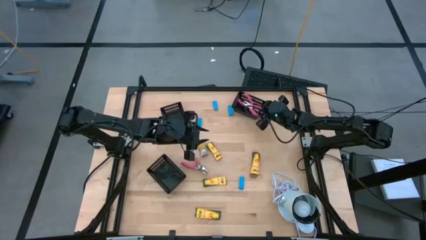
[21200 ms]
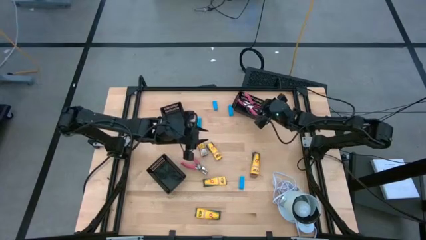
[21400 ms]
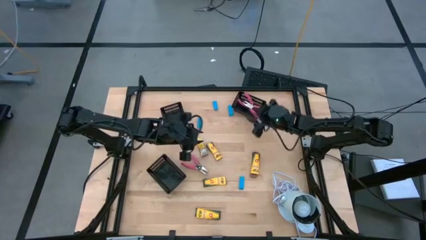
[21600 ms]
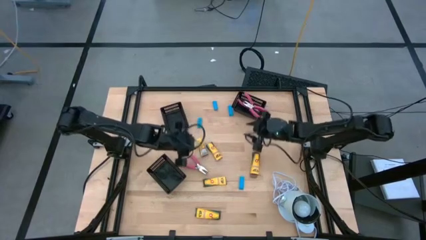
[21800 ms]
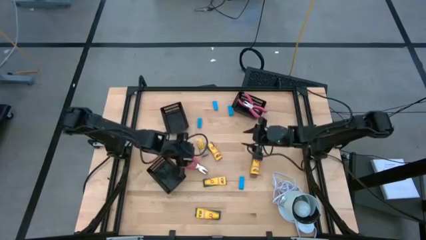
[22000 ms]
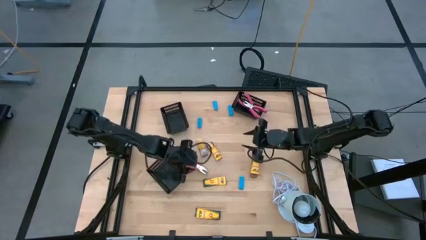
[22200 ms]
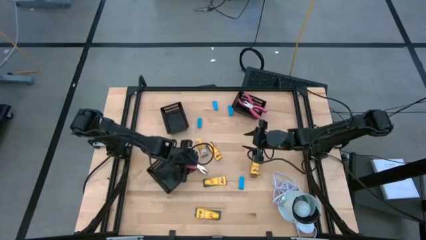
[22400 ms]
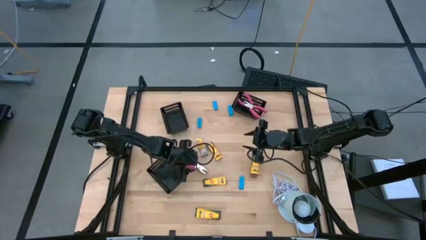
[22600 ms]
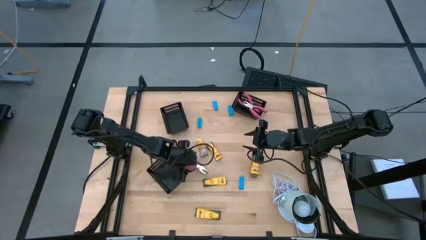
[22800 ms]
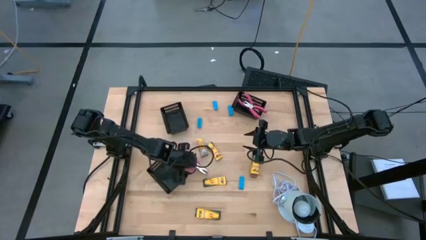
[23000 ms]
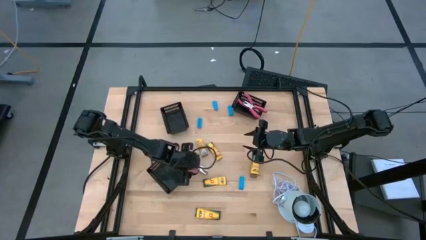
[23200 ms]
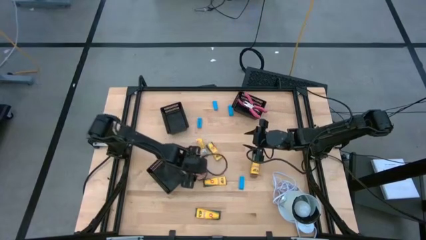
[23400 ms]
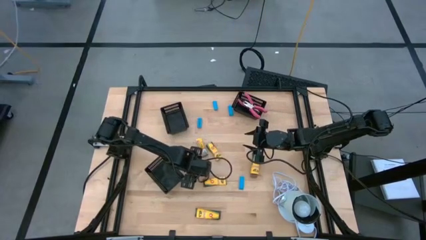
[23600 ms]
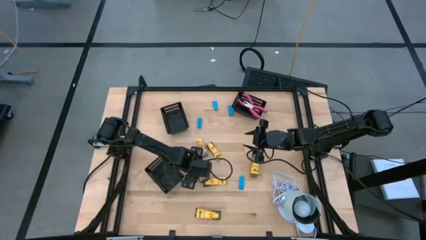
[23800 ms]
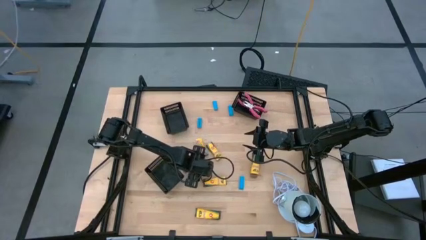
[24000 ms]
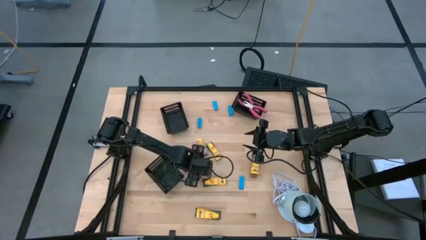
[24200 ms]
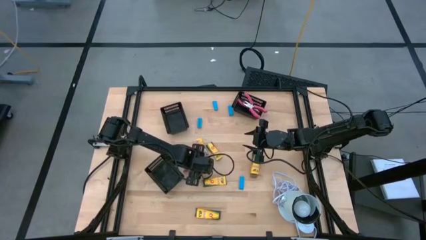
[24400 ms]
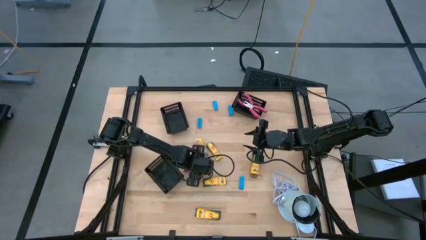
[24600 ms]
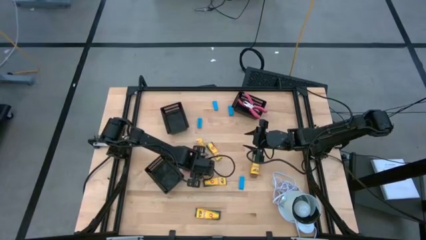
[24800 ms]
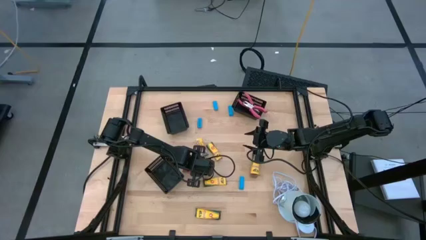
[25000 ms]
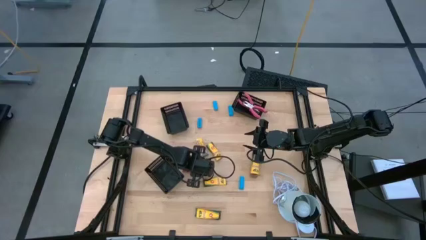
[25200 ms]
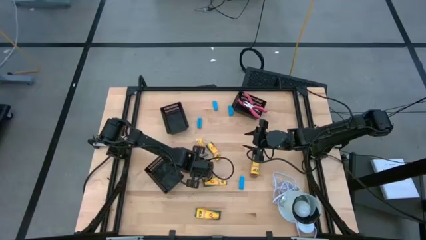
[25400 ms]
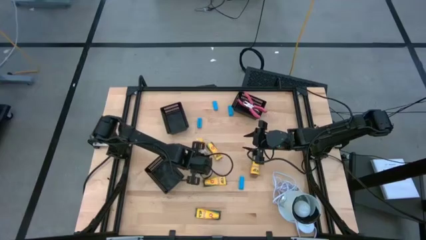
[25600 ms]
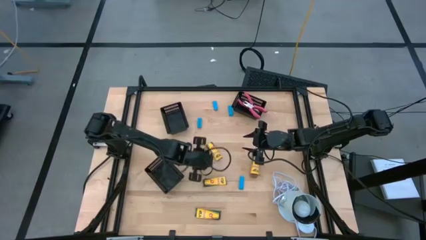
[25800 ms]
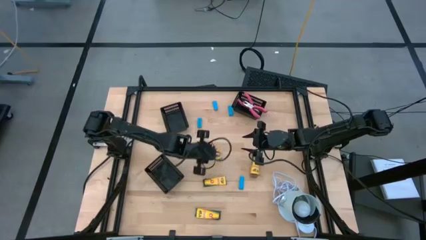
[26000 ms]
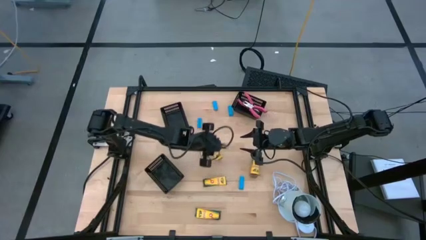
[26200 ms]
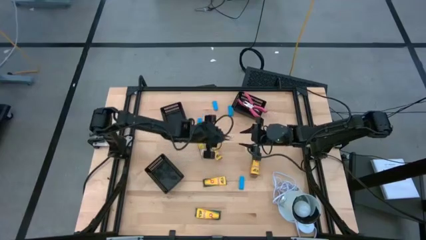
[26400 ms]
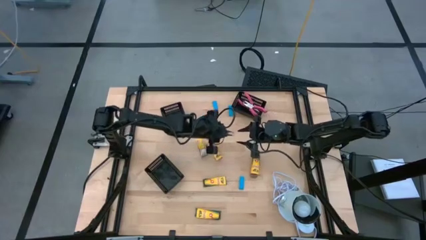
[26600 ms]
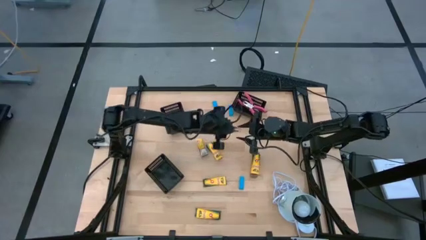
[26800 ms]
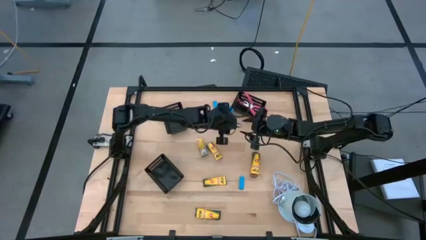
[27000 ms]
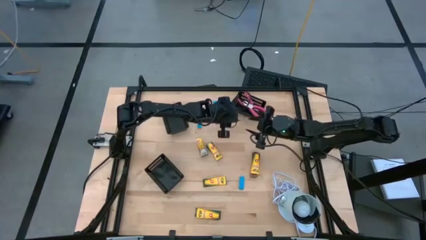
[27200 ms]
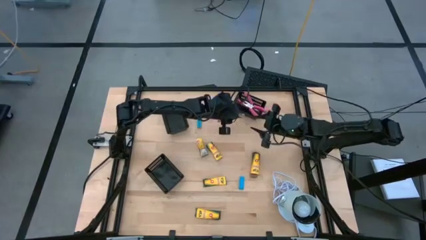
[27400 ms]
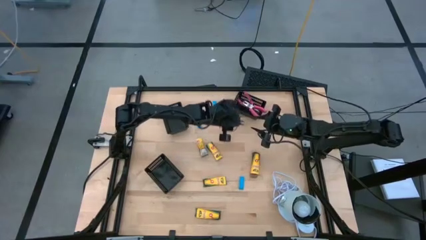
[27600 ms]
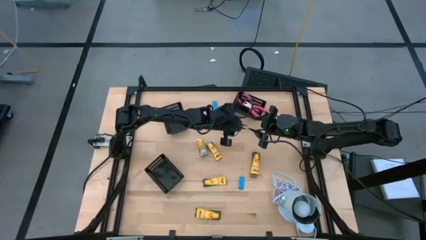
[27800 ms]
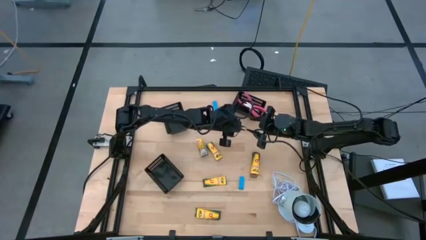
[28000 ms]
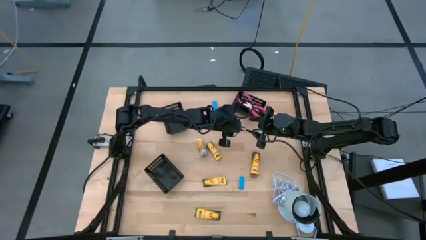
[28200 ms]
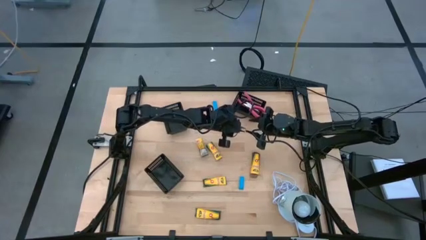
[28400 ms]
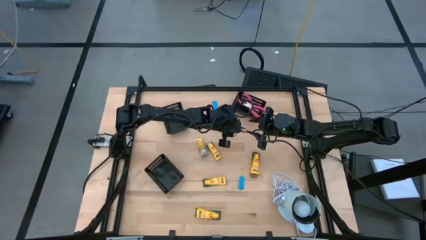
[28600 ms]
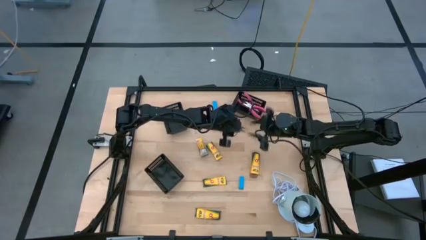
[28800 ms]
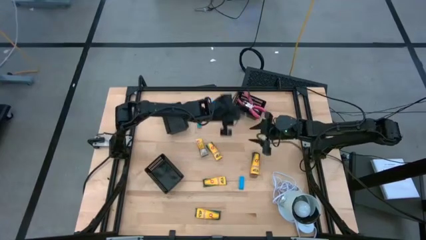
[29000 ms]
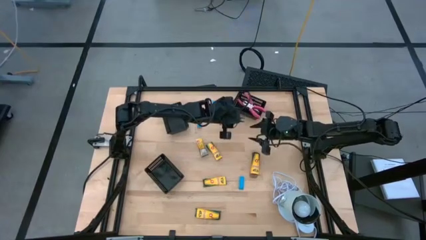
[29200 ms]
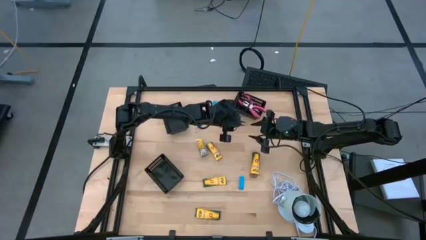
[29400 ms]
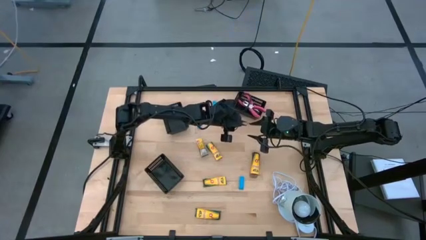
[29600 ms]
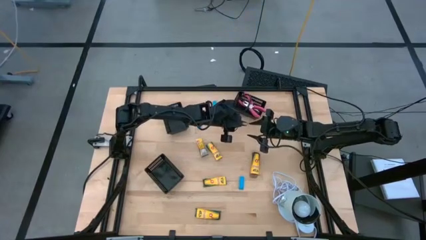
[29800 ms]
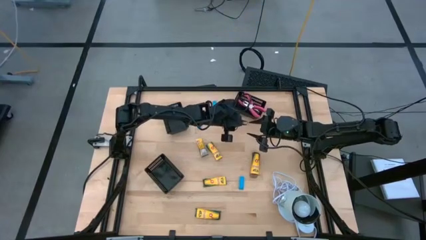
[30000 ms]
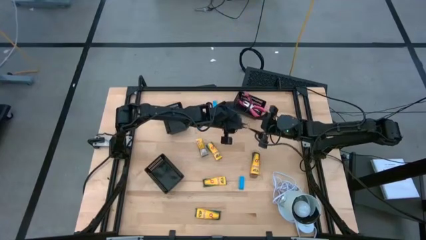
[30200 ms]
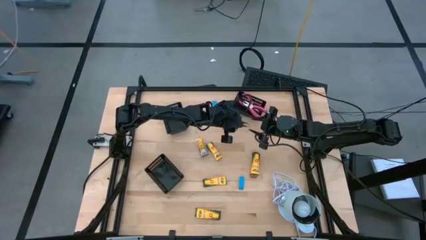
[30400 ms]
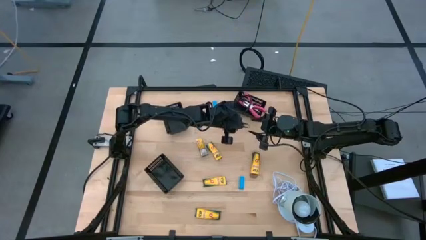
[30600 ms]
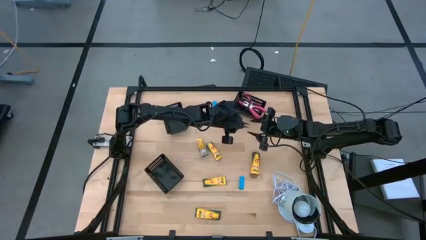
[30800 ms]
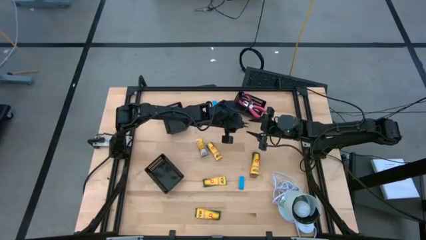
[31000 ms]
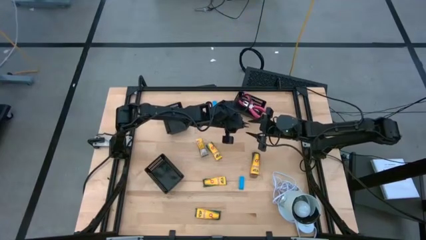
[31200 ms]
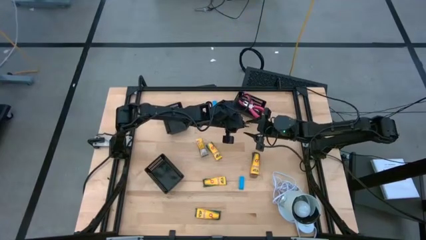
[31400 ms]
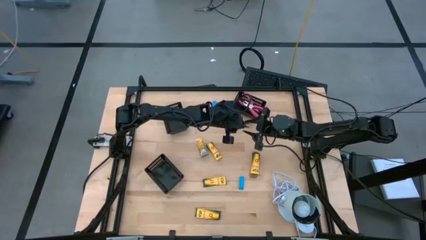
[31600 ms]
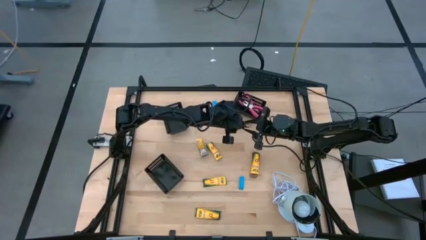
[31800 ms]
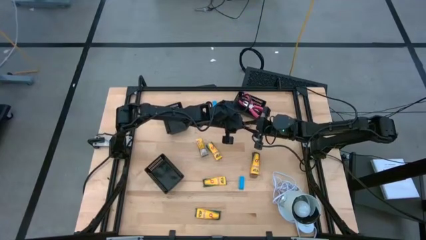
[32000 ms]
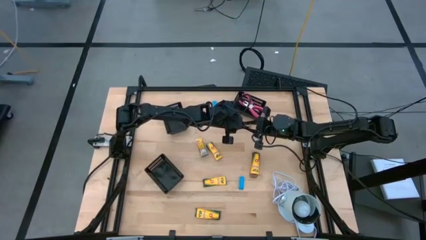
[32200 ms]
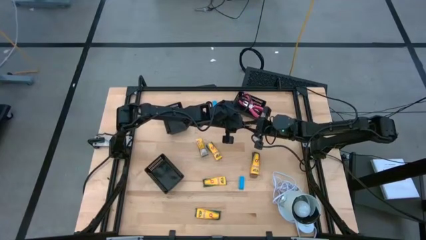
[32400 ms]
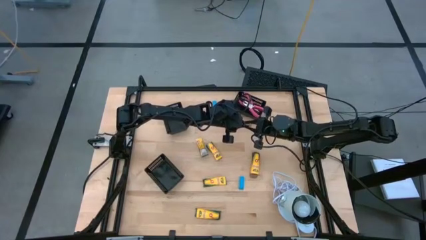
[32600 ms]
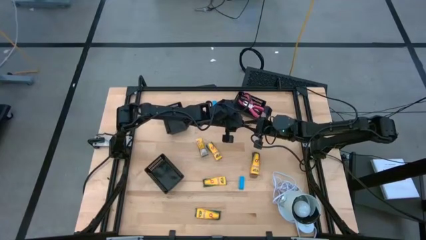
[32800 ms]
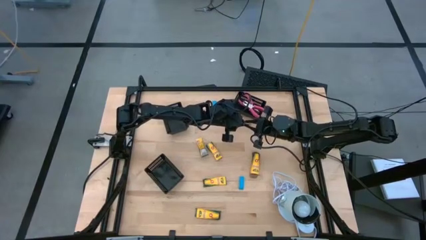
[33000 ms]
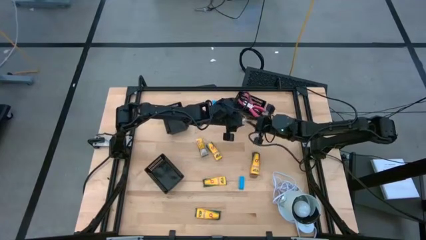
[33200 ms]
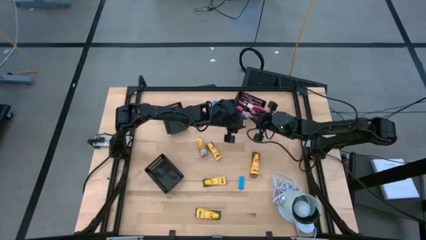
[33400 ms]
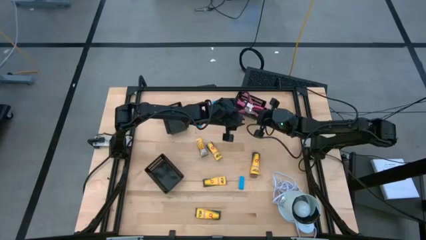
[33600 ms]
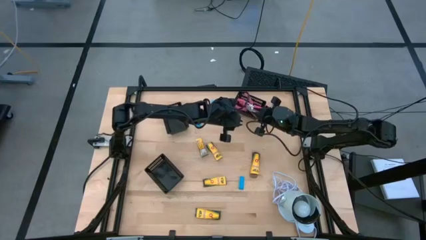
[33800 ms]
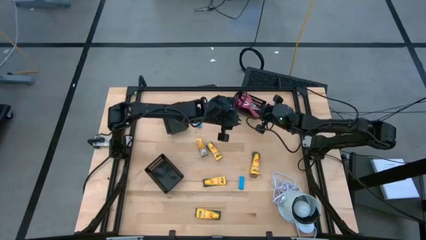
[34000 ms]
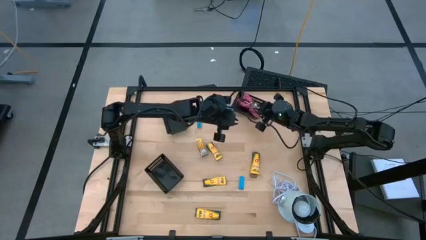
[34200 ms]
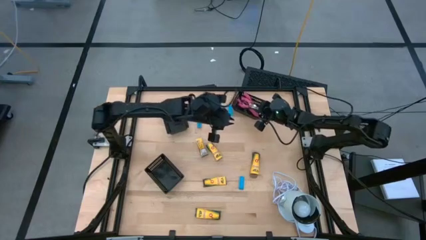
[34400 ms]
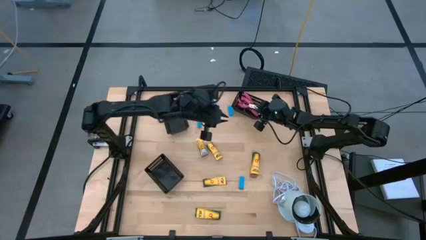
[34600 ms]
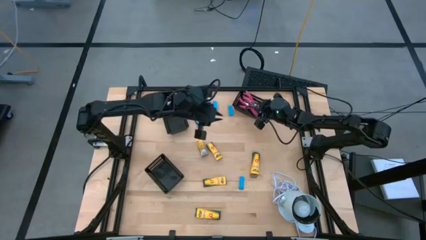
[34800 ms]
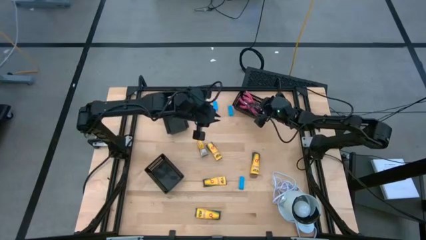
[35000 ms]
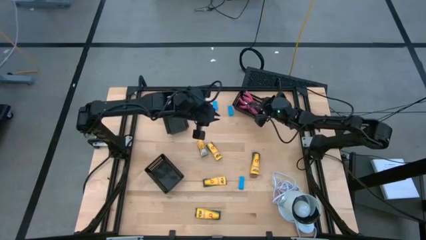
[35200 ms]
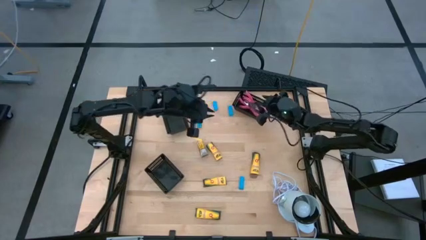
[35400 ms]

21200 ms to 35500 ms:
Task: Pick & Place School Supplies
Put the pink grommet eyelet pliers into the top right black bin

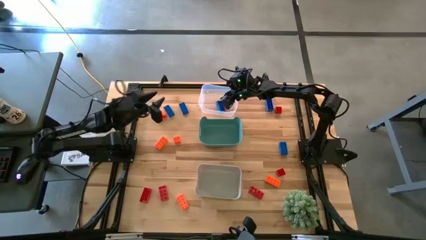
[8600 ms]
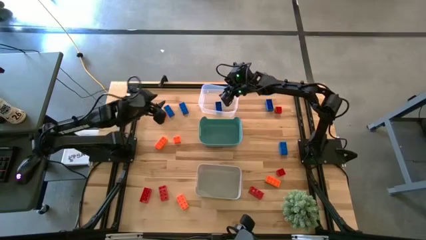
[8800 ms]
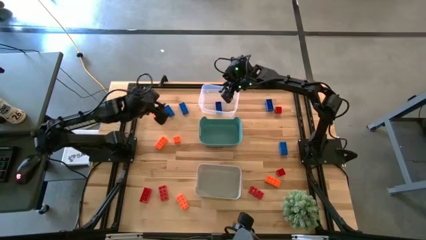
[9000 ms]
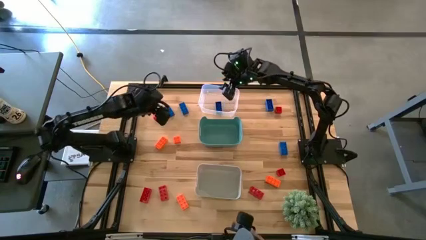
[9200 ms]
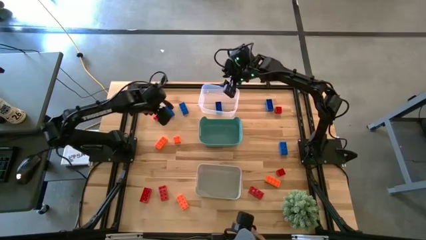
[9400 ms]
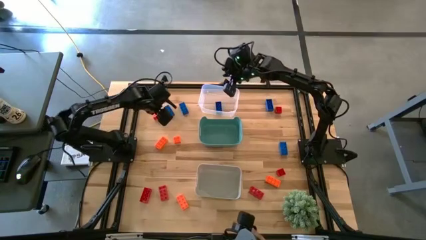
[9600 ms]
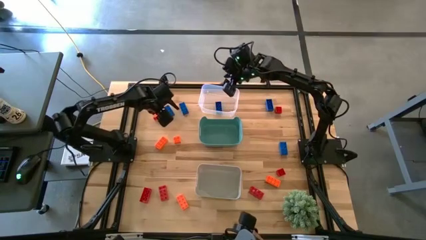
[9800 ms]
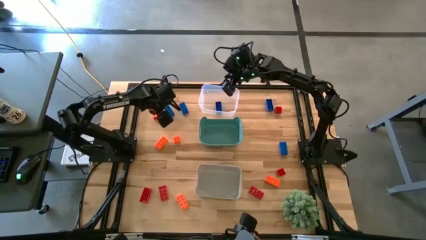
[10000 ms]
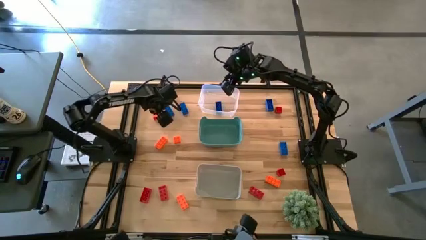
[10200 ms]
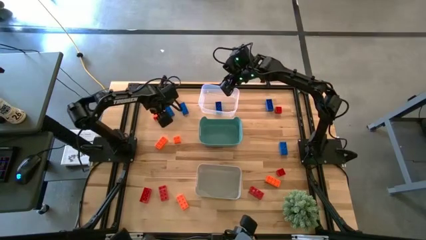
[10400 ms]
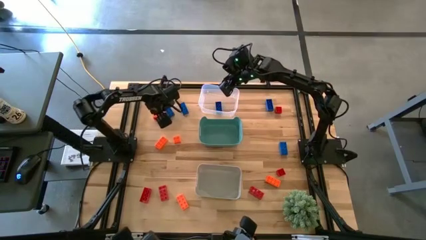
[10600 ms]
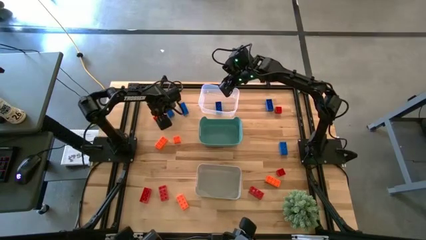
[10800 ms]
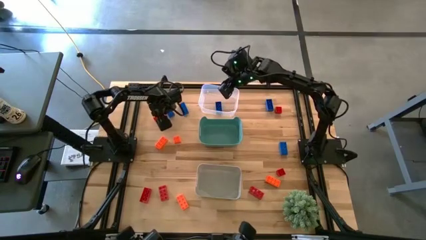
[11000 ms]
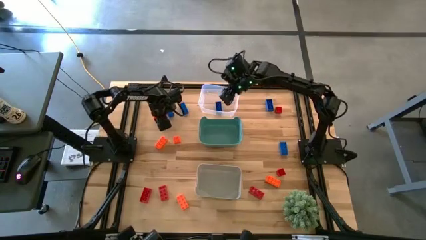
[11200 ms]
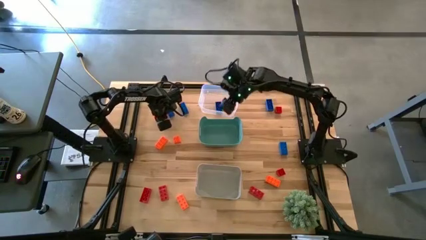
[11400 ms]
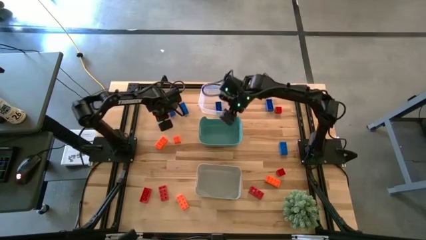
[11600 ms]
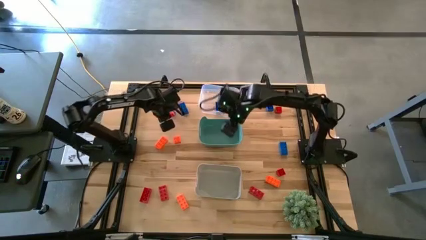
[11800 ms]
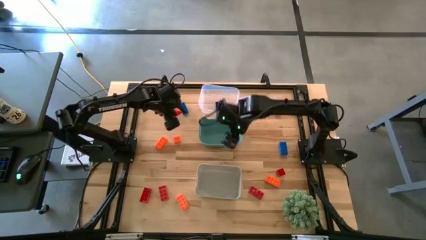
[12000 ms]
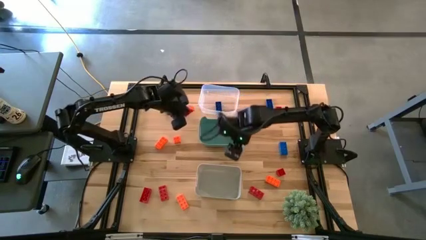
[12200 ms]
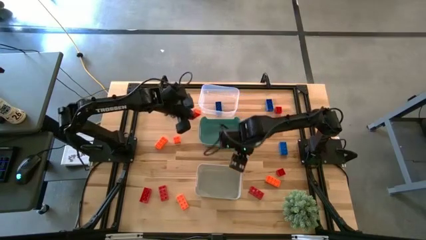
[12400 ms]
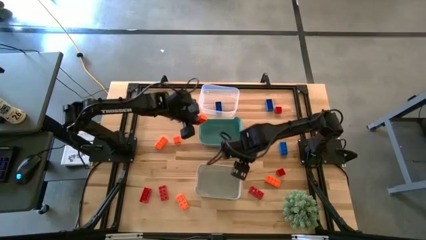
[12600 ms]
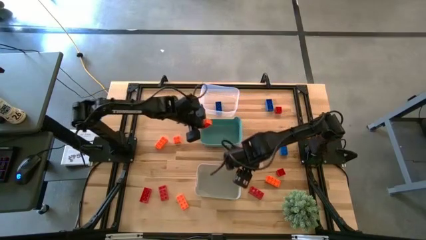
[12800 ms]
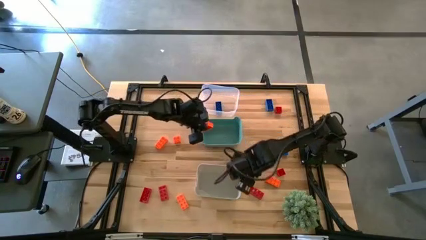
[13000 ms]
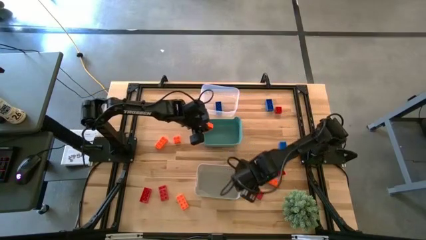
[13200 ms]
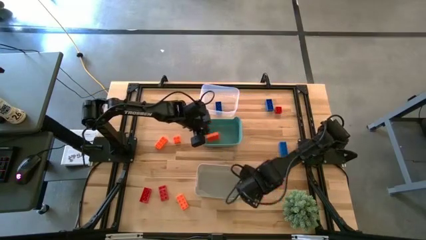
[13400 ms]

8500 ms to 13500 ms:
Task: Sort & place blocks by color
Put the orange game piece into the green bin
